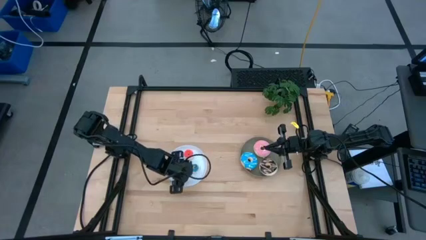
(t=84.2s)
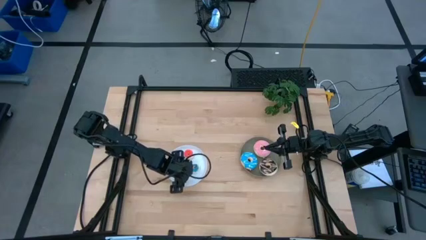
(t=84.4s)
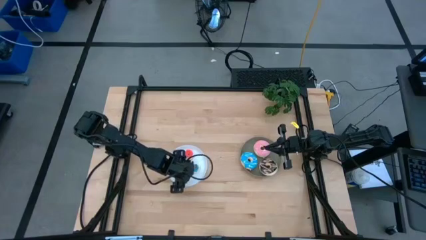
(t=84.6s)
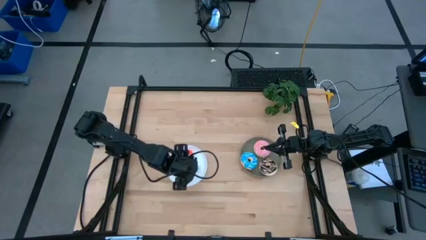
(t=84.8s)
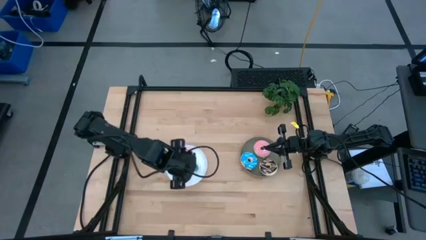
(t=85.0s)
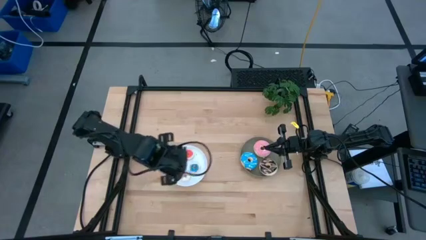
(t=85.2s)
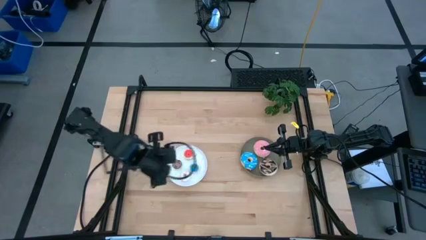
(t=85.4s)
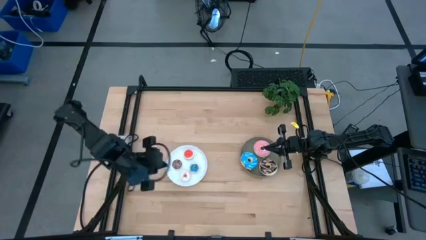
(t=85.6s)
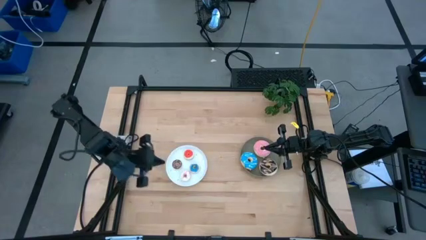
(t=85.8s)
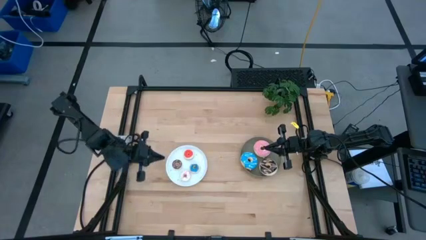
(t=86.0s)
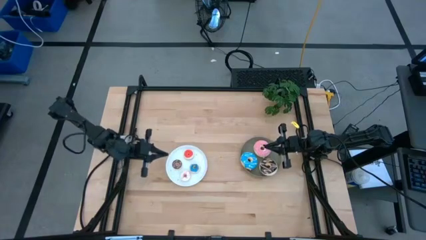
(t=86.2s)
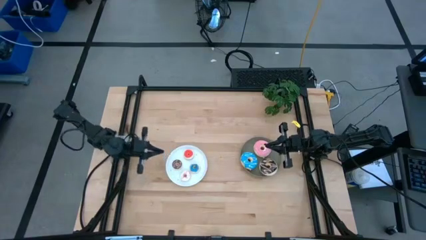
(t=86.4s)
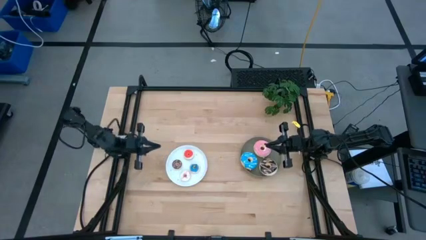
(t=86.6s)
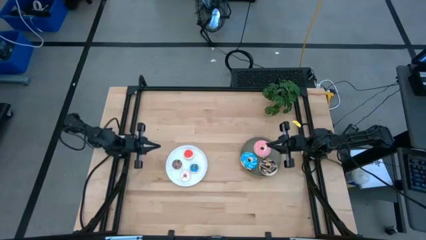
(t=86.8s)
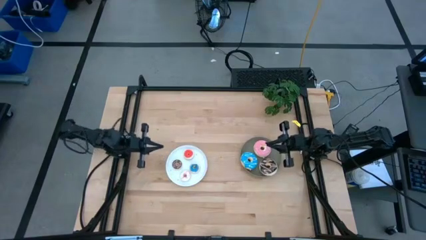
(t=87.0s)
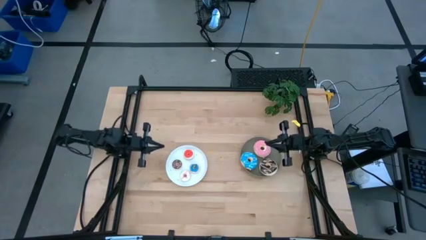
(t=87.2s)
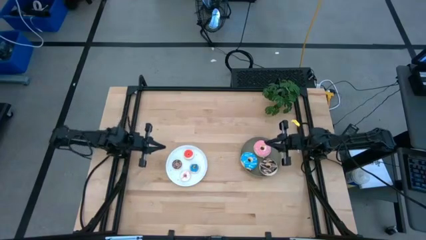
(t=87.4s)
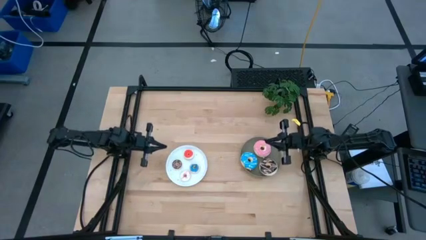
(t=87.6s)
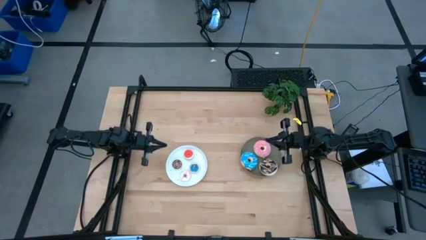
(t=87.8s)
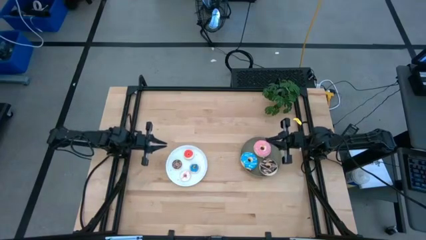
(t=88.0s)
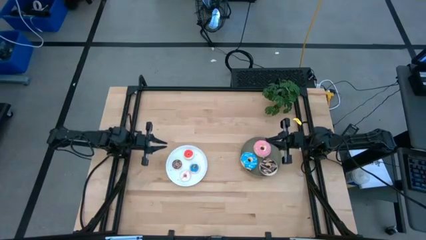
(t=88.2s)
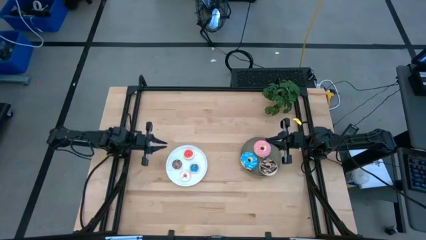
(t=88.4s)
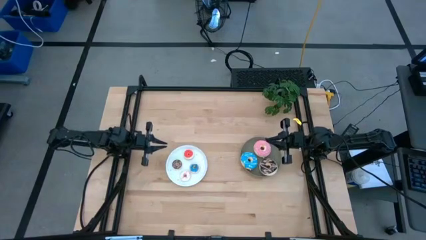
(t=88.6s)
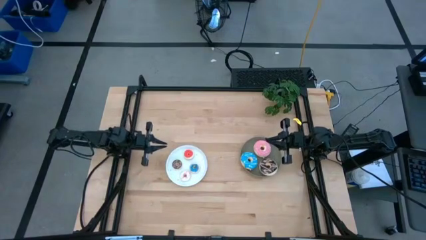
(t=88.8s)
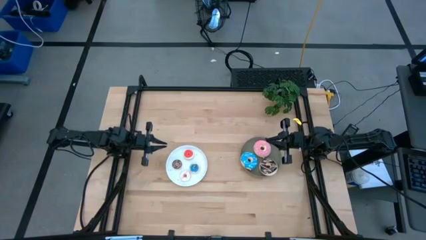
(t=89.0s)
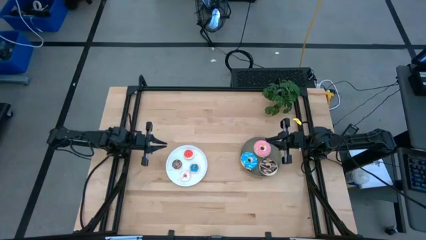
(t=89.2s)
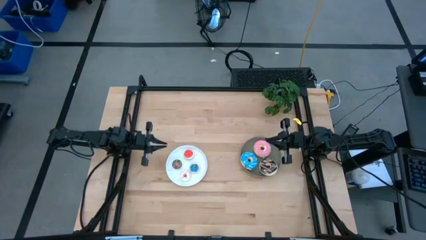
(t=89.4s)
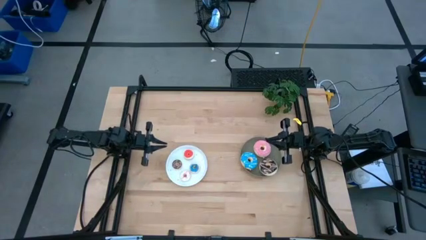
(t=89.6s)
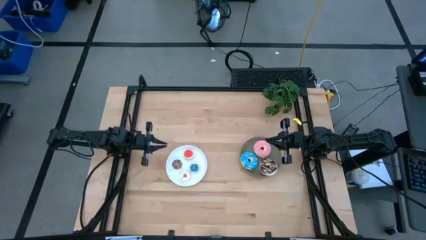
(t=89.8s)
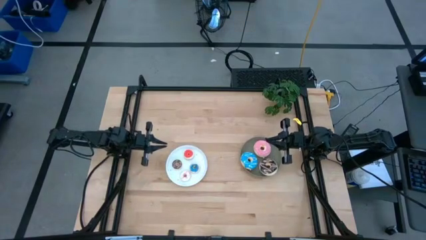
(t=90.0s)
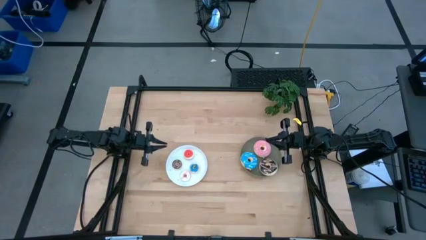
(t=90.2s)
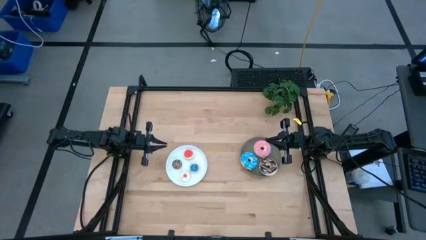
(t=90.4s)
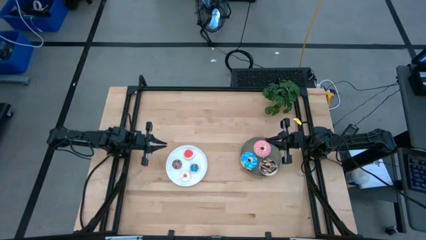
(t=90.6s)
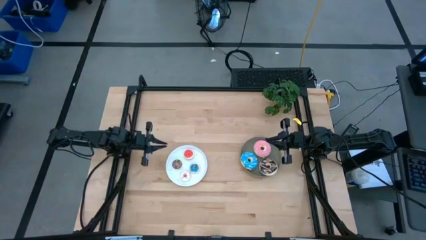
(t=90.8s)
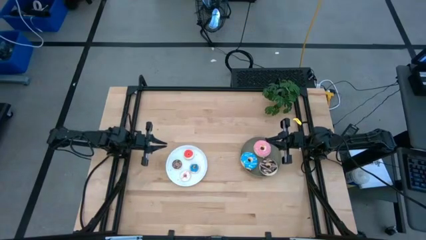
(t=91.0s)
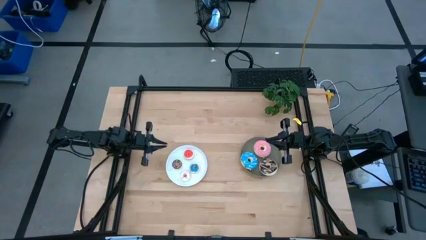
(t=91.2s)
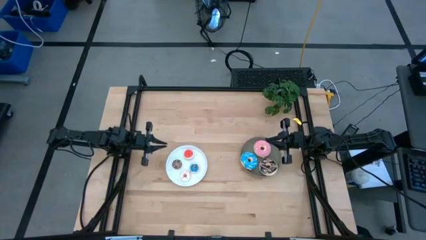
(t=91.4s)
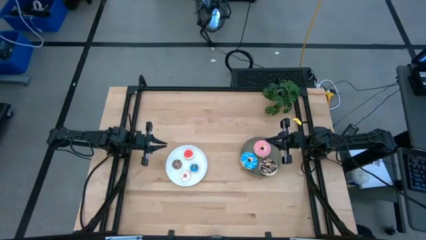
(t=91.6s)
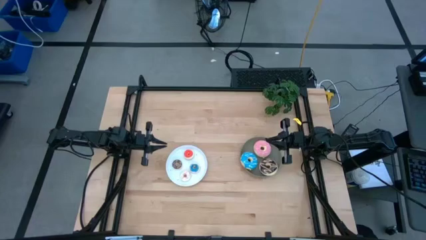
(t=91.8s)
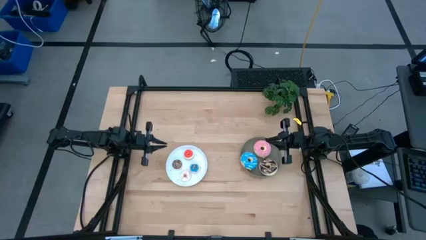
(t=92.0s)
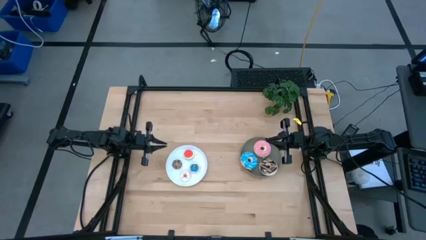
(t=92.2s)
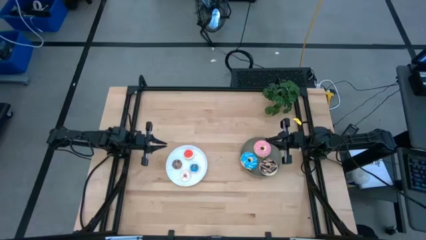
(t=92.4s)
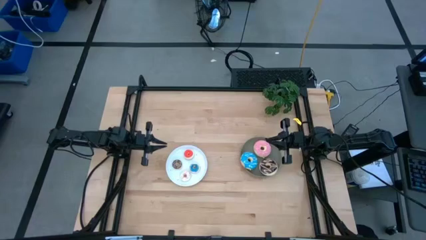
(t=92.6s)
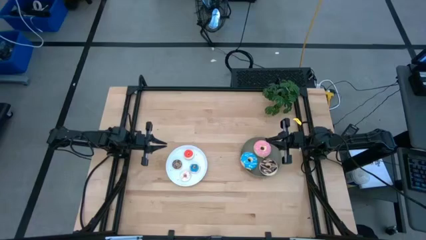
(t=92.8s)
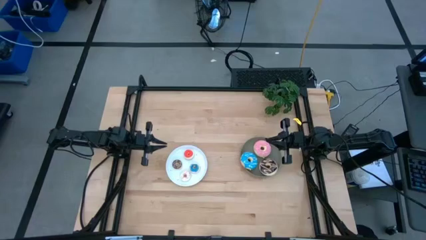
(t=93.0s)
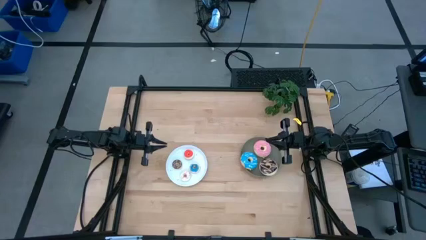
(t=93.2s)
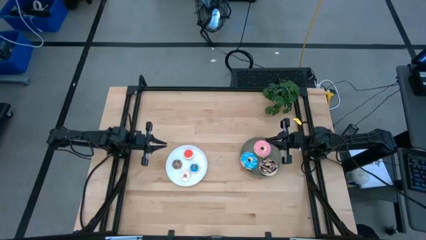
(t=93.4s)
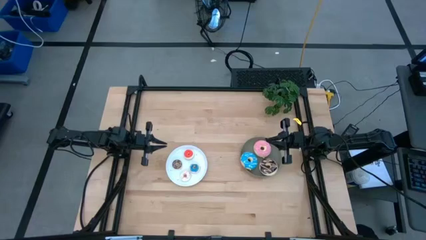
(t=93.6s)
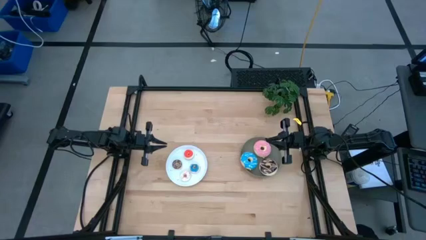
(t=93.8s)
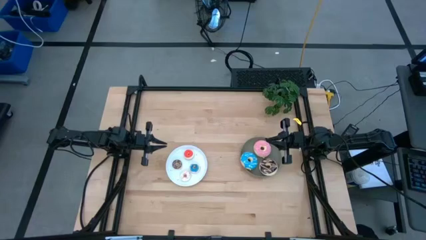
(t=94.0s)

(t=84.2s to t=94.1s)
Task: Pick & Place donuts
Return to Home Position

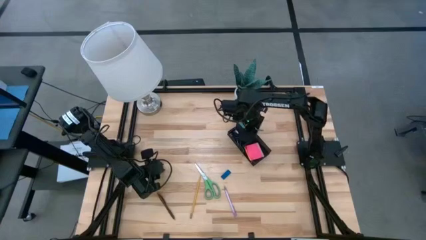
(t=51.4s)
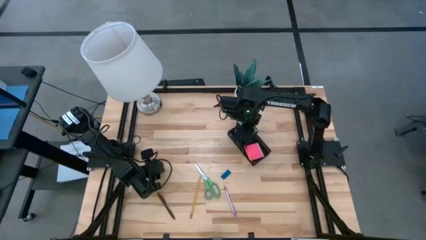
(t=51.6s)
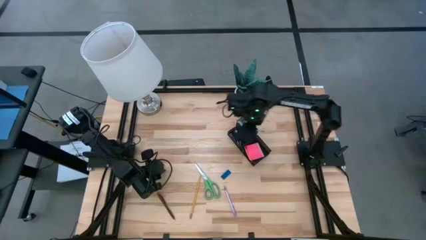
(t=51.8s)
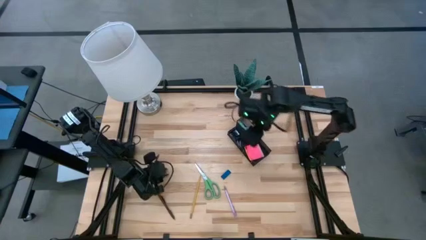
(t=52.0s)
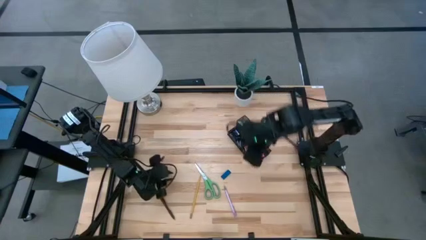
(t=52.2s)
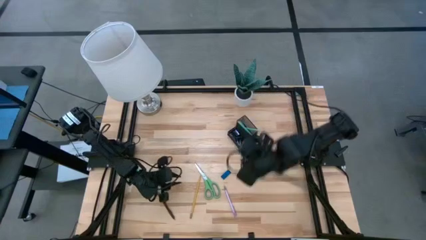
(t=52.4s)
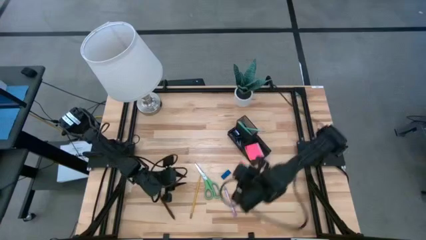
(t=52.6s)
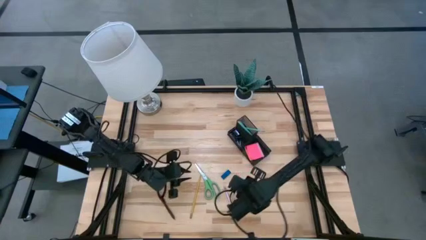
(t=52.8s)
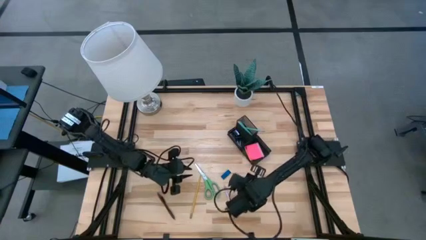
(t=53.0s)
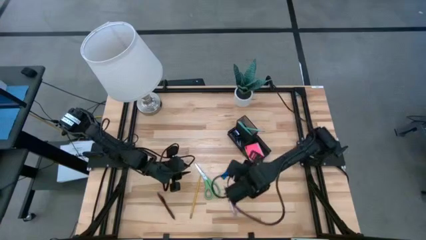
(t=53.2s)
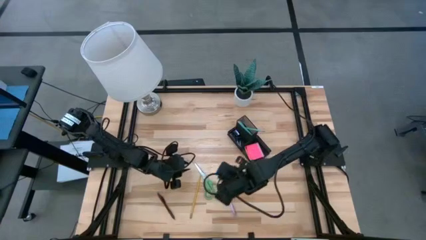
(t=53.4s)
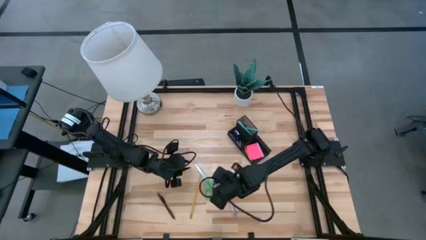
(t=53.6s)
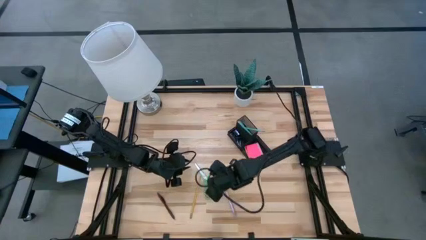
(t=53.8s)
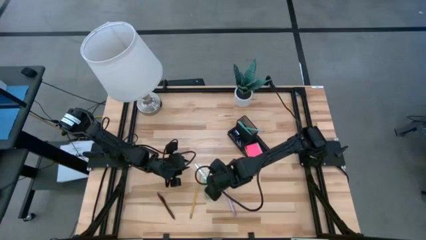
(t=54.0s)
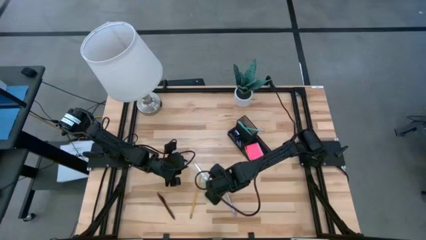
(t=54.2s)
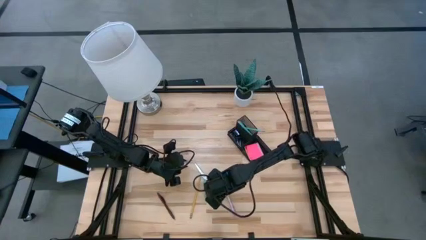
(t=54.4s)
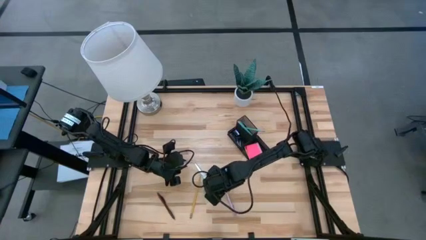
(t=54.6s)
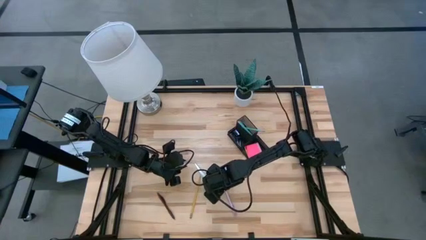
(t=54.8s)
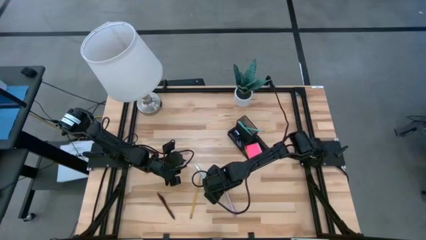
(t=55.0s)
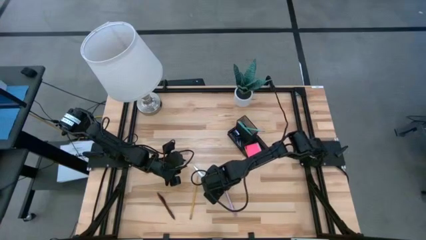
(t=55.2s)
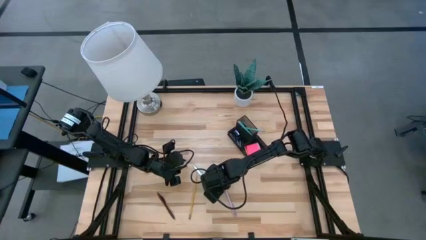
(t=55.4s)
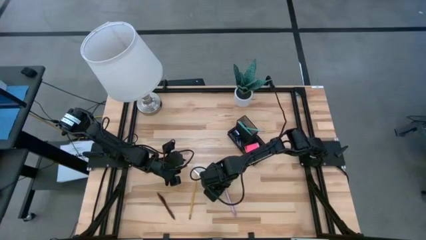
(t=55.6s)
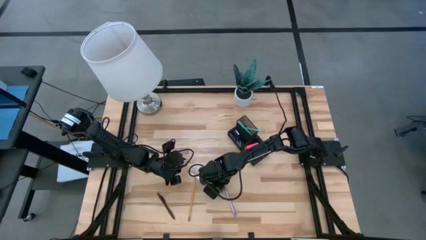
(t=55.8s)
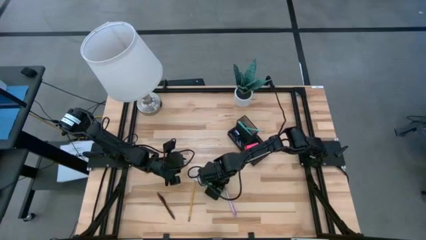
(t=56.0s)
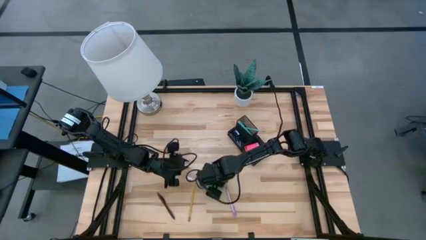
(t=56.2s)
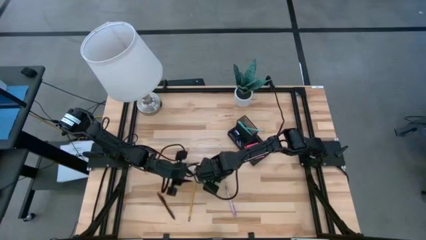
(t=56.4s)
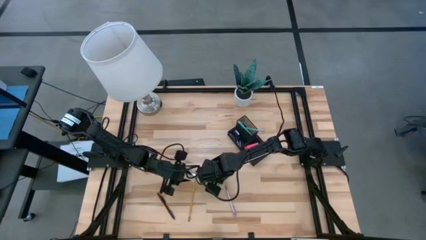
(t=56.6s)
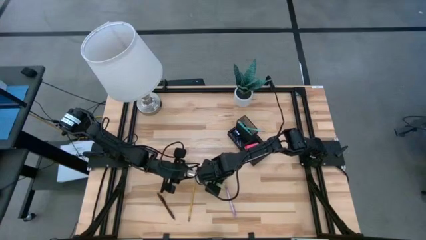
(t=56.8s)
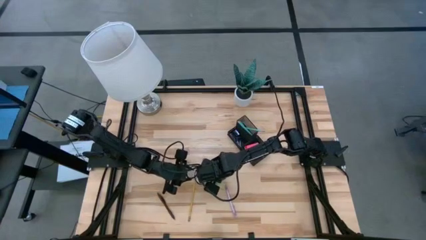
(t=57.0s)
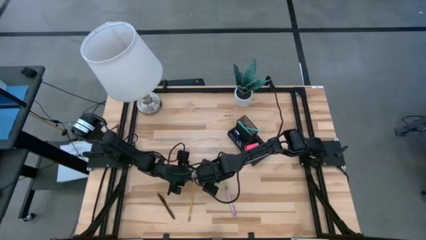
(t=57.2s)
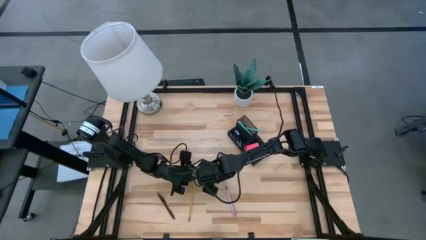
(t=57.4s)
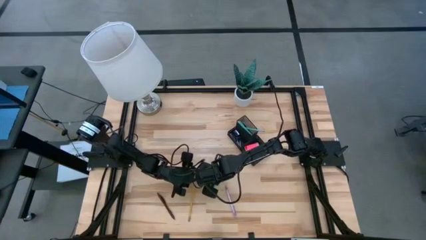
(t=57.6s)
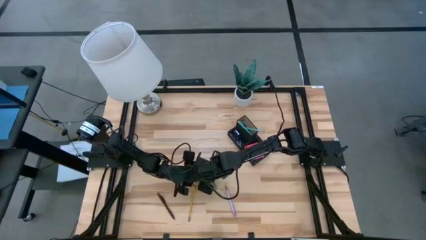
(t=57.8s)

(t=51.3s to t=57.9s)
Task: Pick and place office supplies into organizer
Put the green scissors into the desk organizer
